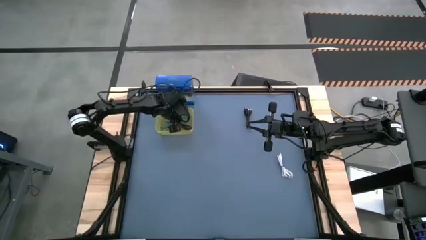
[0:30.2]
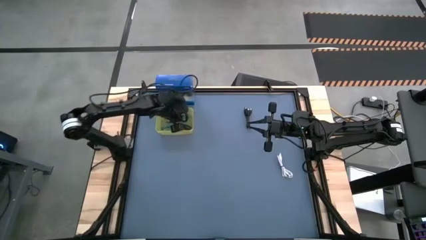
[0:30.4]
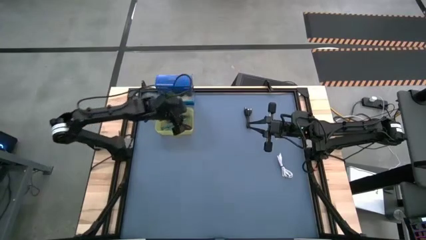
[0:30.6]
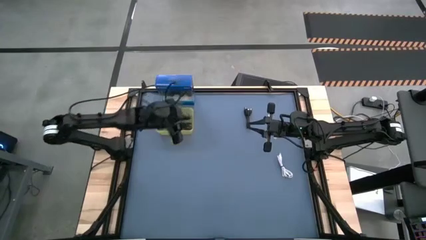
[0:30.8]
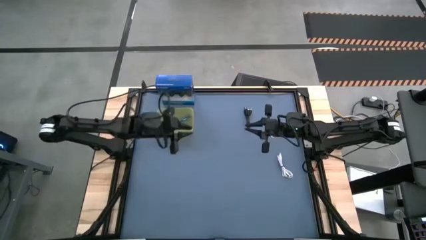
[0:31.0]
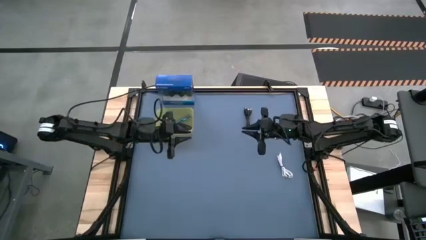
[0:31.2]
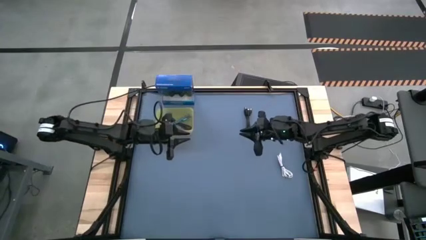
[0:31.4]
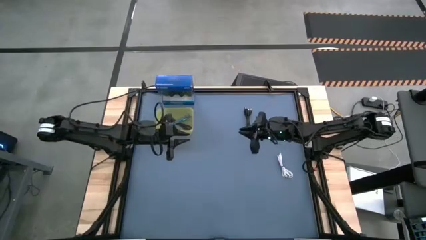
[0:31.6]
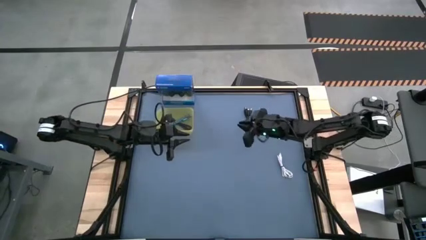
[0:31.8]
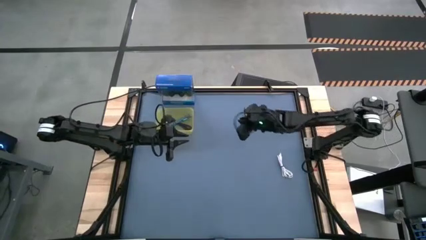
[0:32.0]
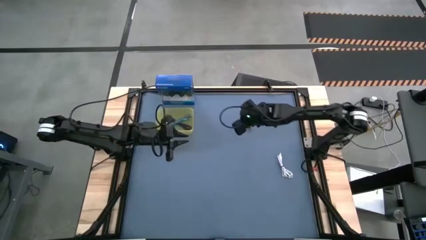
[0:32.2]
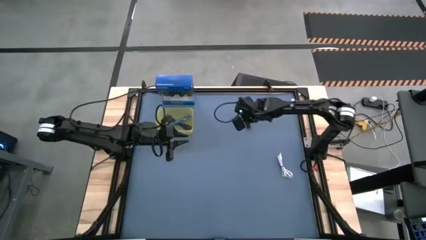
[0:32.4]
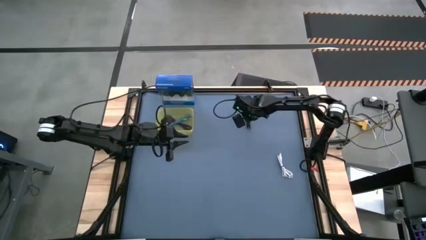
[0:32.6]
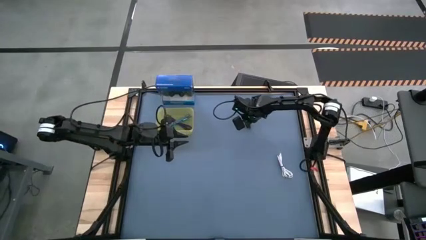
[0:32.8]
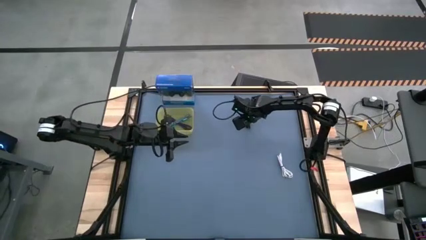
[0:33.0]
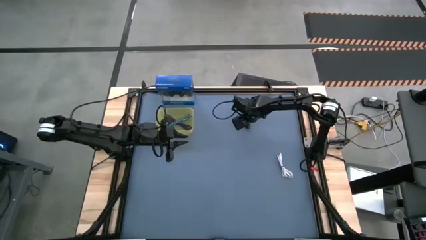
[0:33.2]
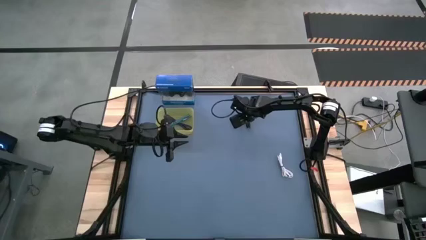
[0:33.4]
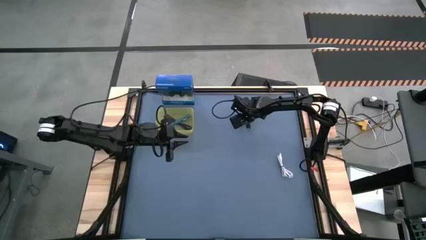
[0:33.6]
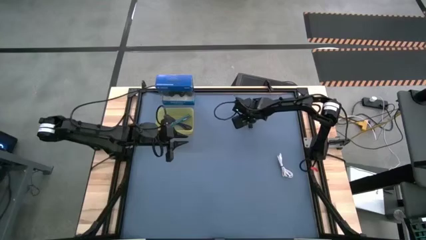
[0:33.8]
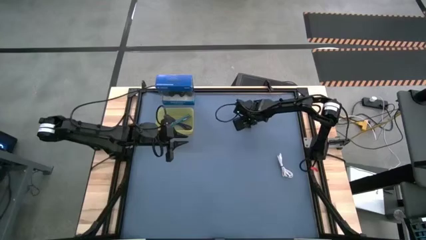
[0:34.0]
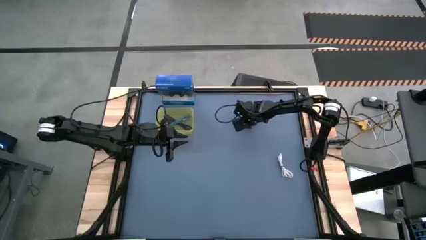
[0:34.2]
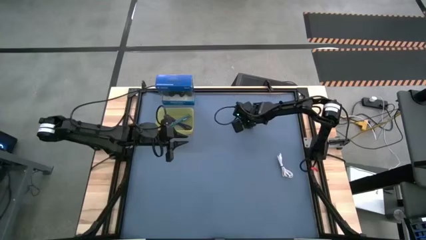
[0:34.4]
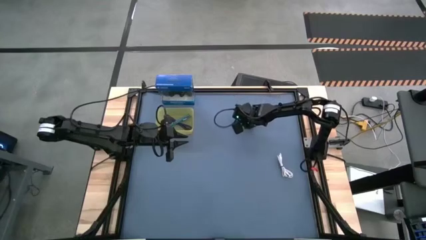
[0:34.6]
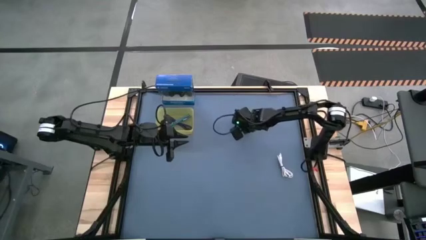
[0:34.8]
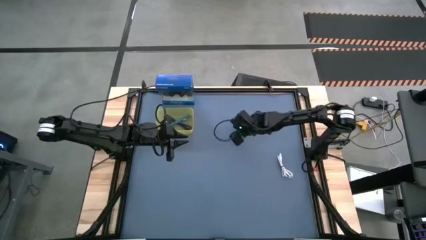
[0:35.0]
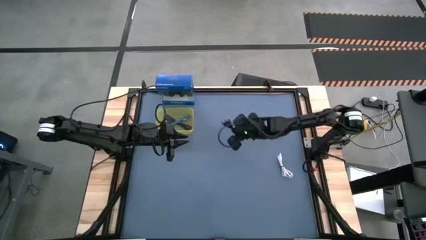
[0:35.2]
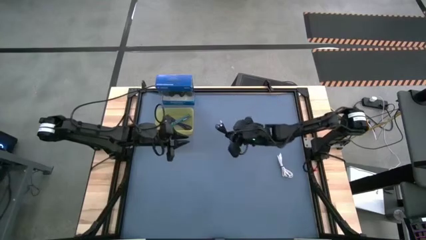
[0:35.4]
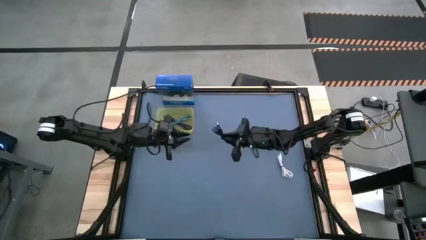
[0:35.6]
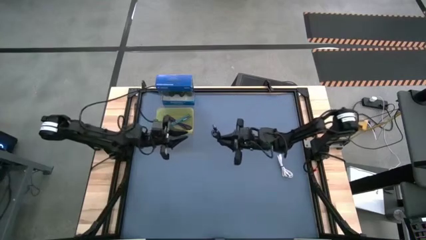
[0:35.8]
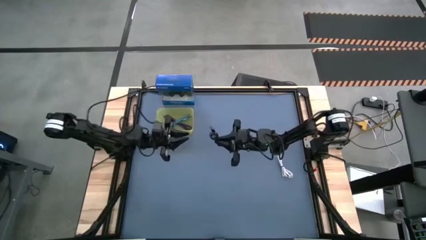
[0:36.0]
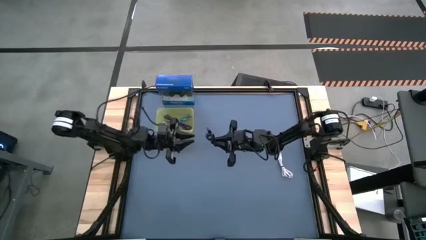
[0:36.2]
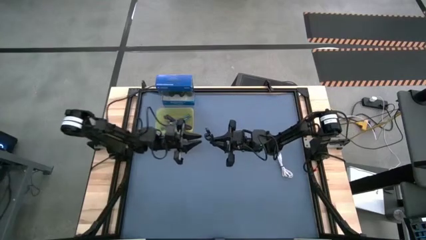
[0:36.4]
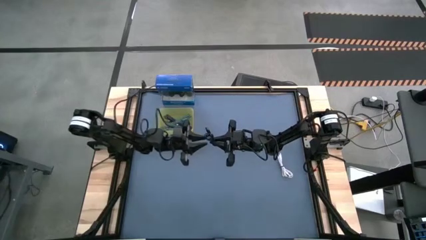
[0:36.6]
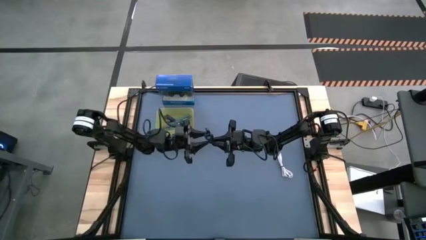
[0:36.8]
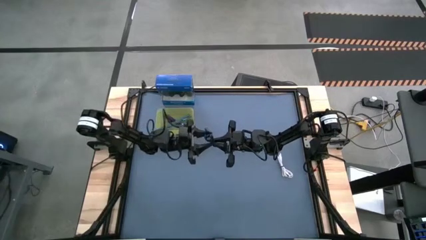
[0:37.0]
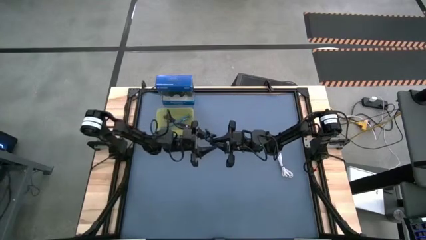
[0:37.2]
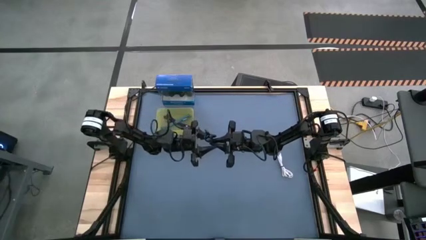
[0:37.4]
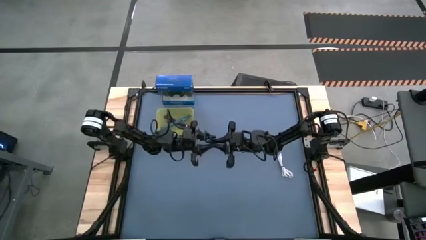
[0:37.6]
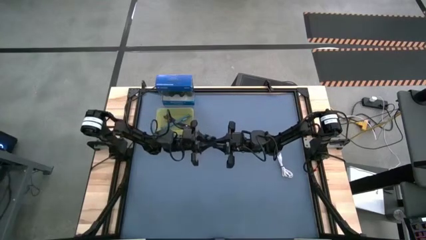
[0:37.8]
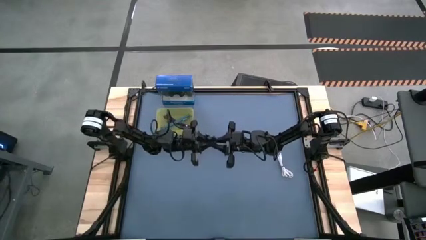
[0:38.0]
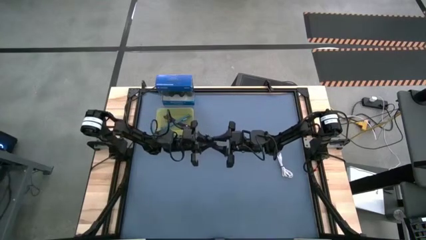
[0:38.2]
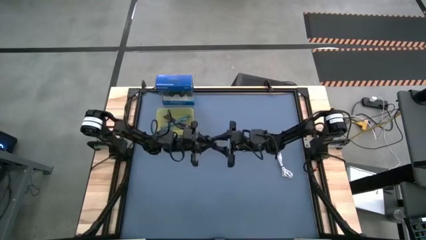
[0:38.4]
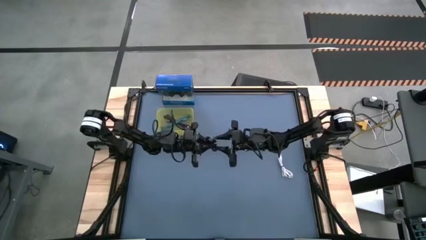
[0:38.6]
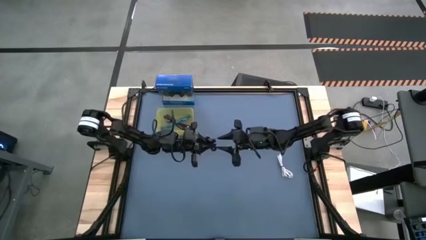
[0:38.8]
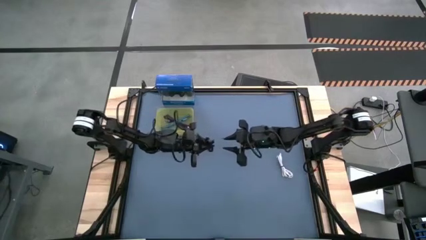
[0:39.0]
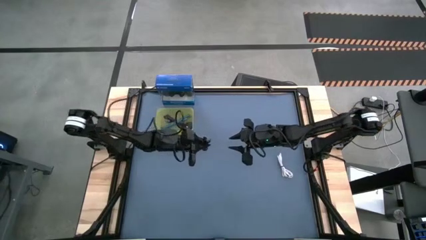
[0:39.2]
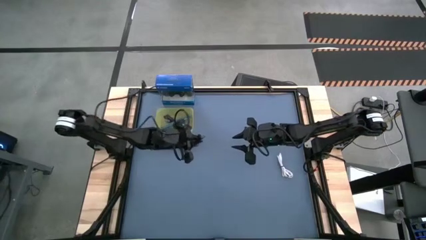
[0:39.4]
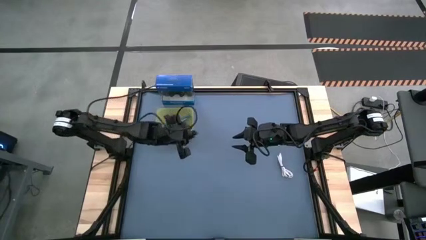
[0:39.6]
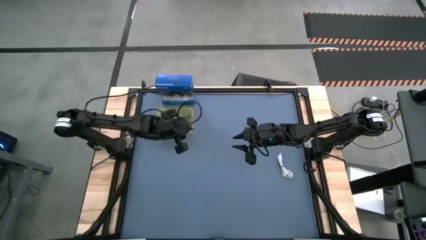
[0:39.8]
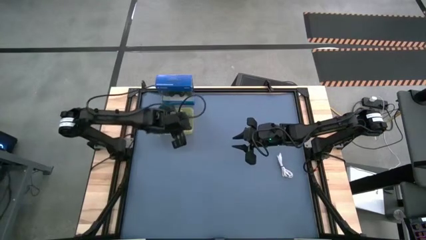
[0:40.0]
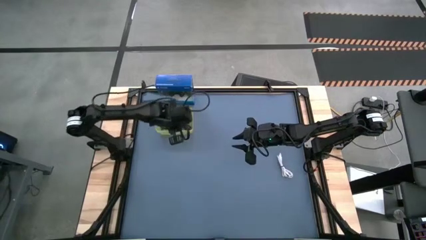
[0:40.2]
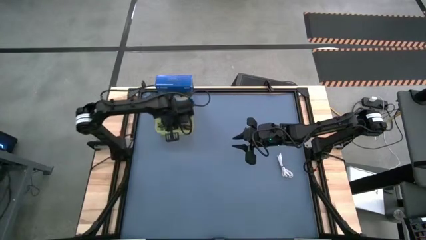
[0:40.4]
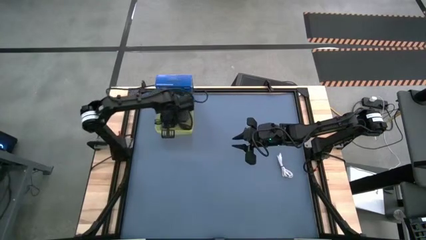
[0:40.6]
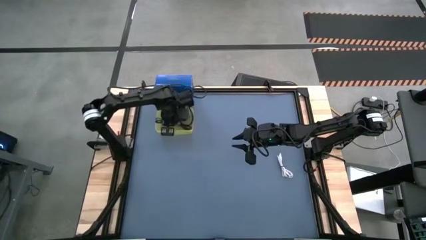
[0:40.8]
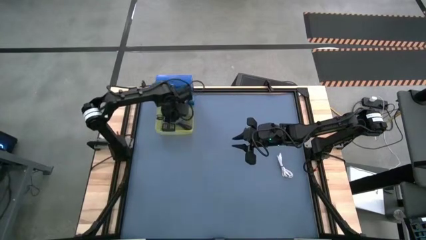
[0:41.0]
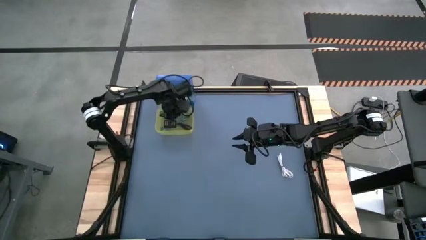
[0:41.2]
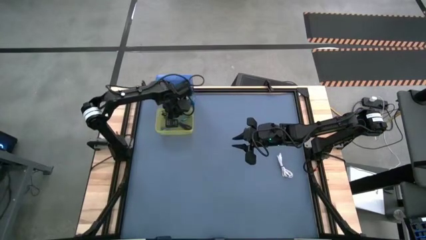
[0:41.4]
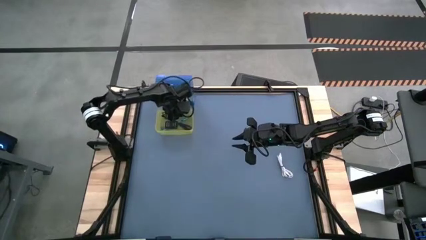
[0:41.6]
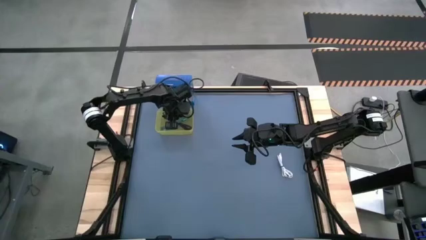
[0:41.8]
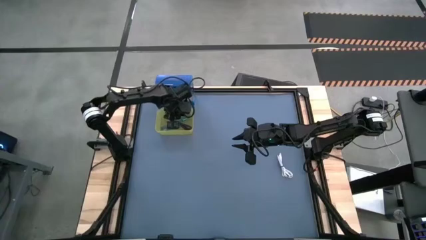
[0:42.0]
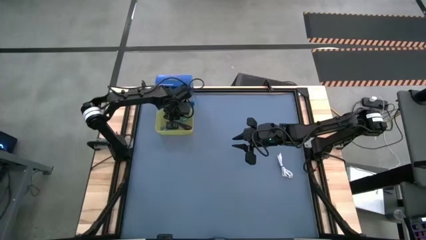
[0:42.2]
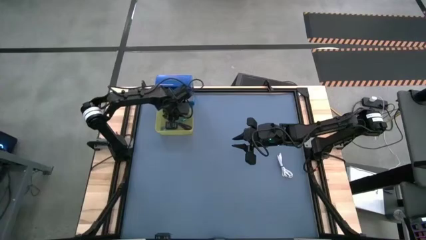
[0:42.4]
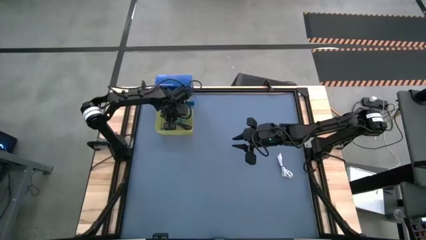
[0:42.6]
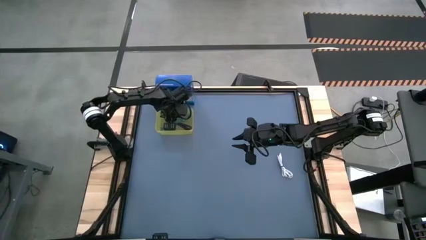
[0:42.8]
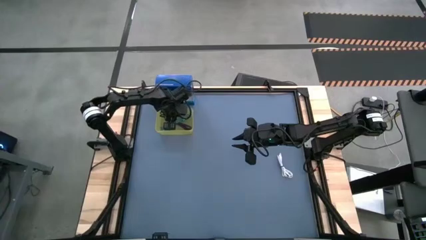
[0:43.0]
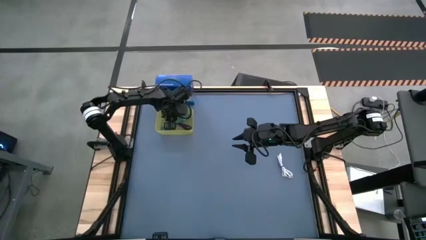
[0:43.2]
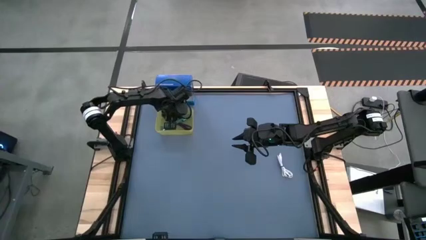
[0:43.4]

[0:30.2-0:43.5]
Task: Pick and place USB-C Cables
Put the black charger cable into the yellow bin
